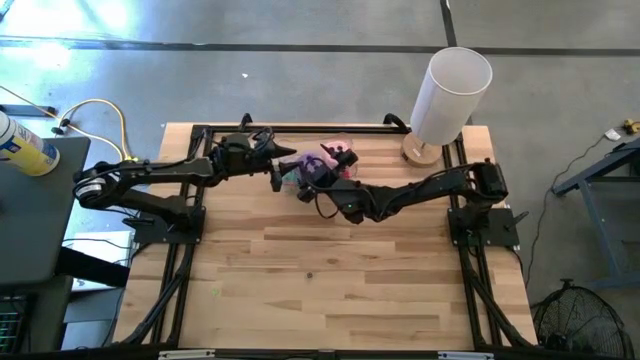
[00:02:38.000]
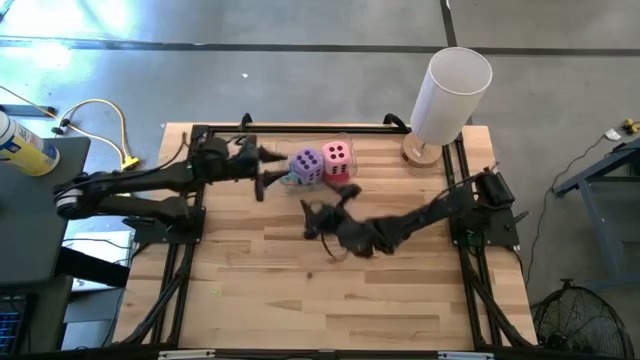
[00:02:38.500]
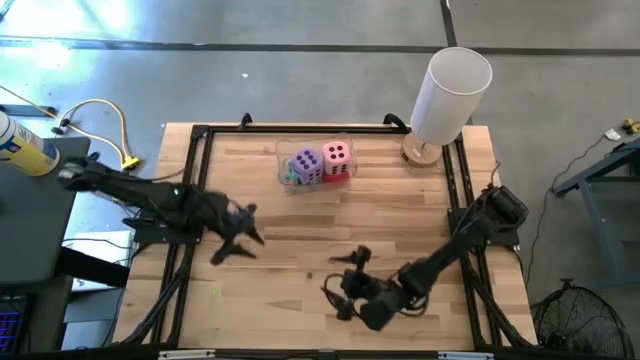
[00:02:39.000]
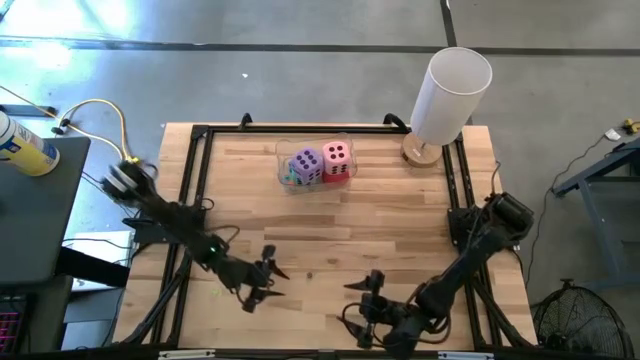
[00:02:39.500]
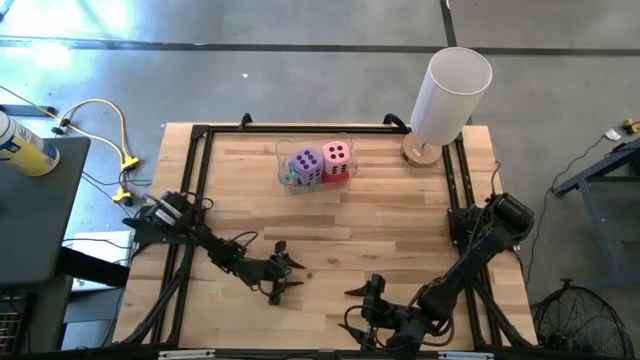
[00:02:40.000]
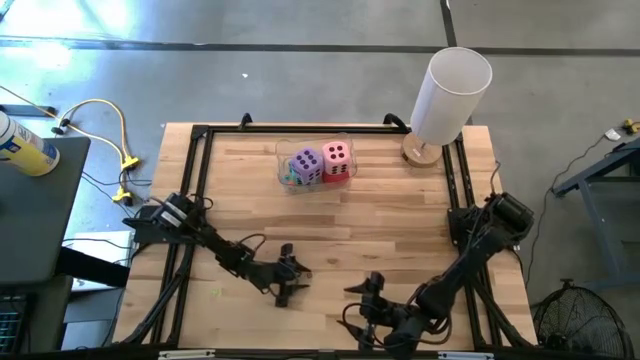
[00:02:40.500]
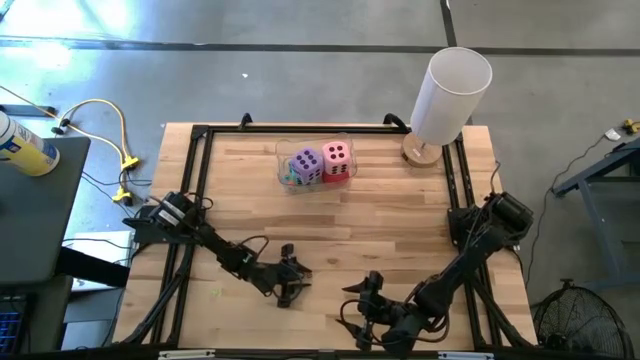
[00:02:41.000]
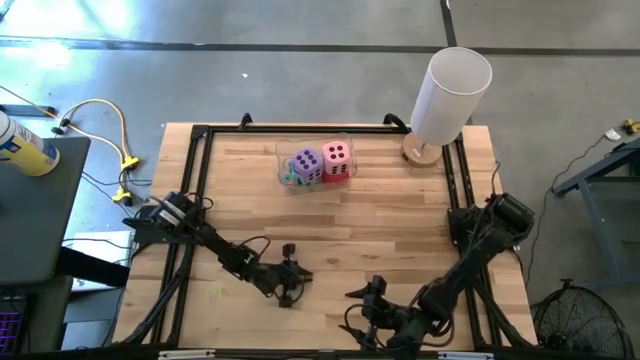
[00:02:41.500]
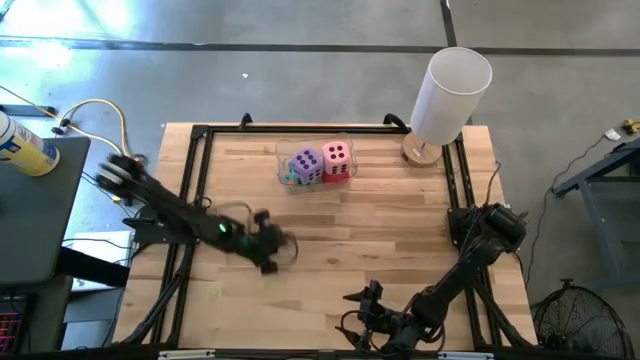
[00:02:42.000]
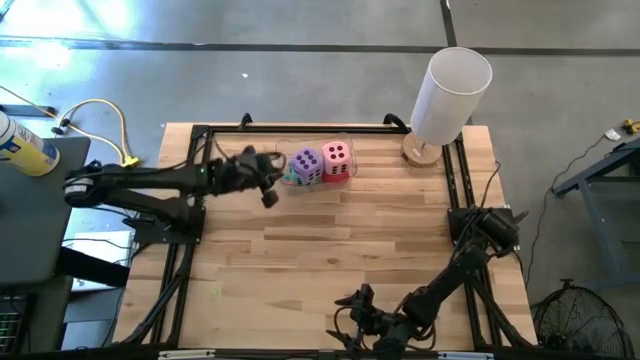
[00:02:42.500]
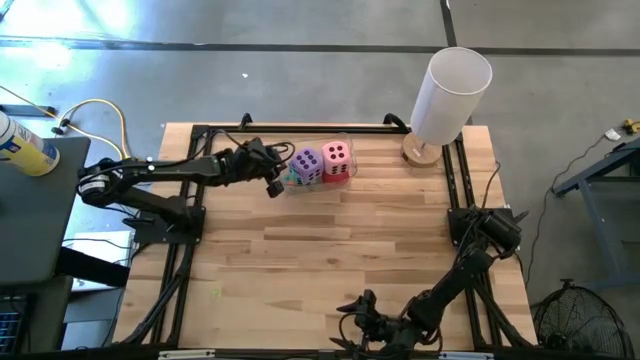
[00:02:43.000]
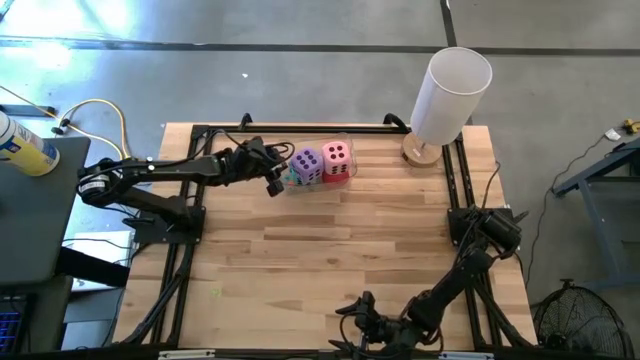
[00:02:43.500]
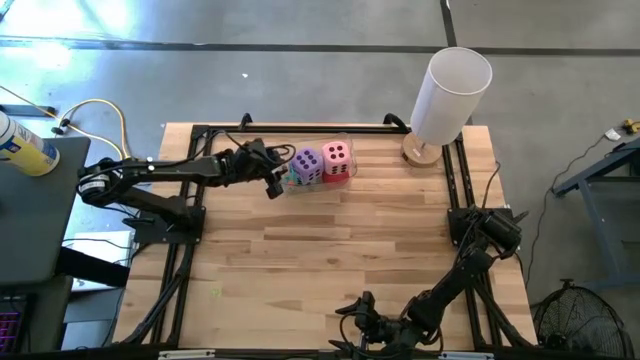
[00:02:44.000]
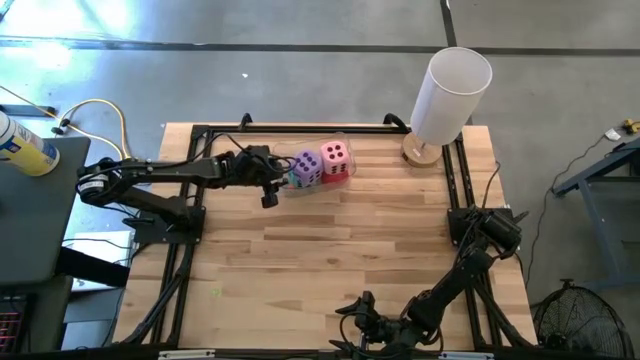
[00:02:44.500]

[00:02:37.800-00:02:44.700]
Task: Pick & Place Dice
Put the small black dice into the transparent bin

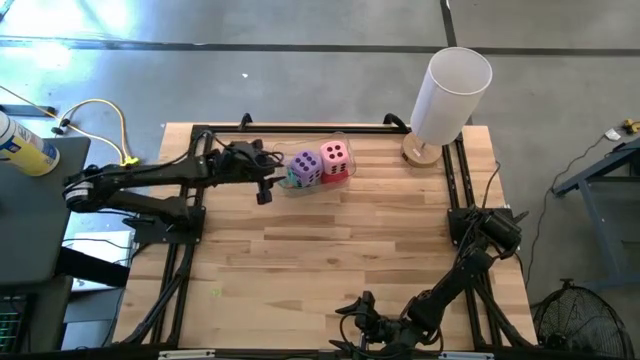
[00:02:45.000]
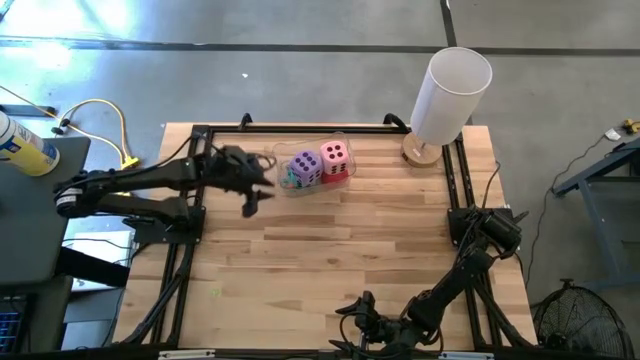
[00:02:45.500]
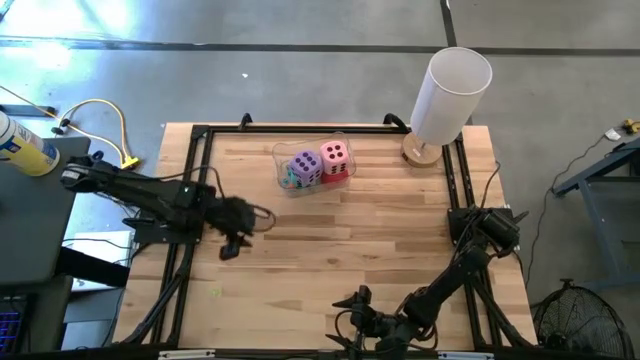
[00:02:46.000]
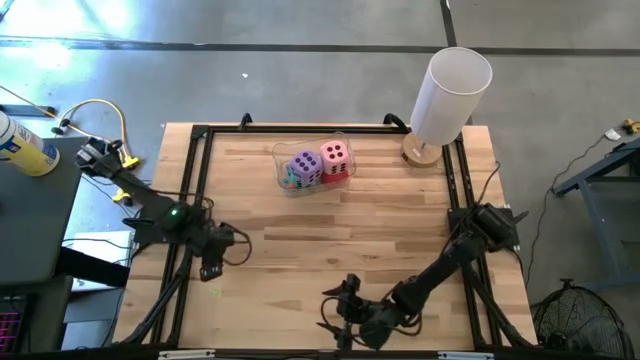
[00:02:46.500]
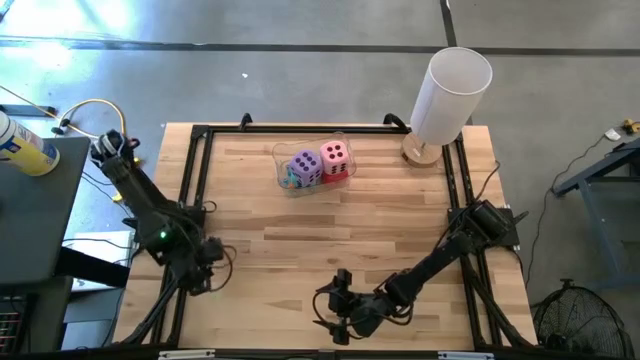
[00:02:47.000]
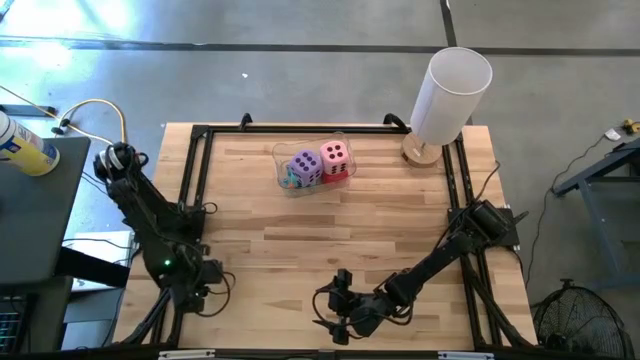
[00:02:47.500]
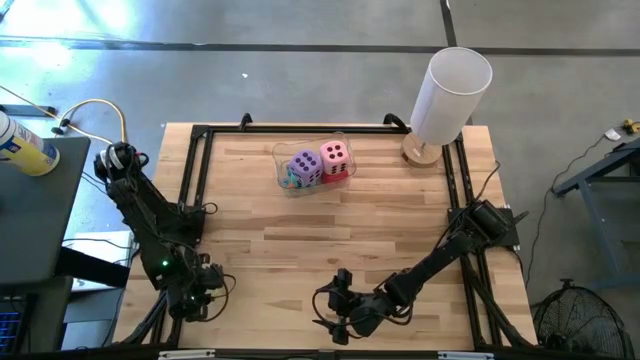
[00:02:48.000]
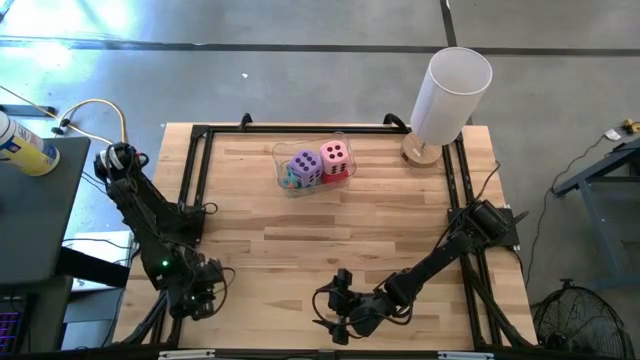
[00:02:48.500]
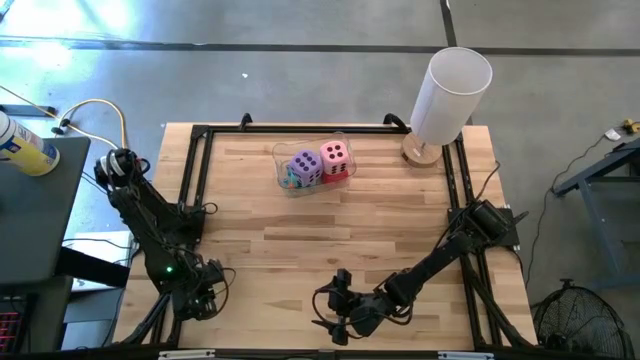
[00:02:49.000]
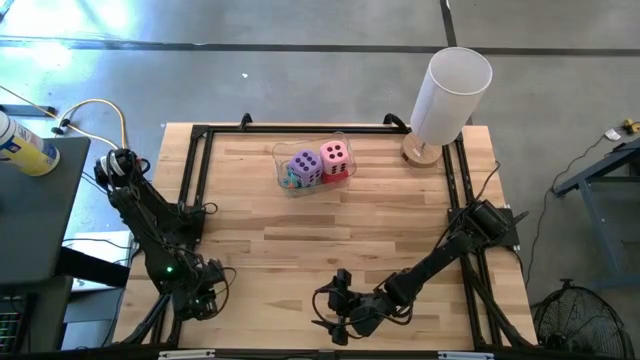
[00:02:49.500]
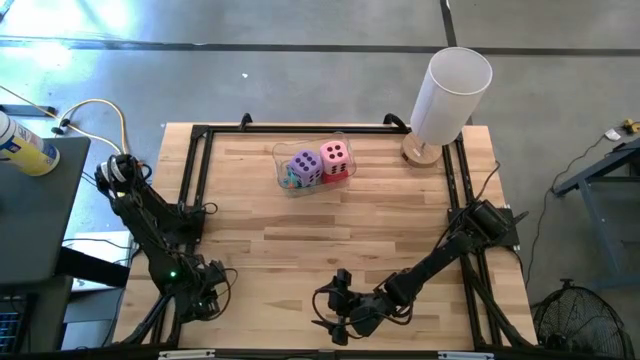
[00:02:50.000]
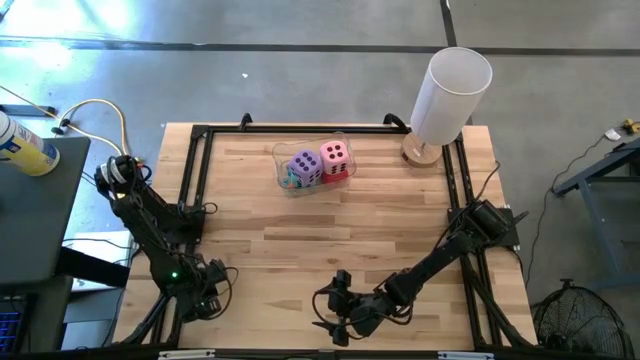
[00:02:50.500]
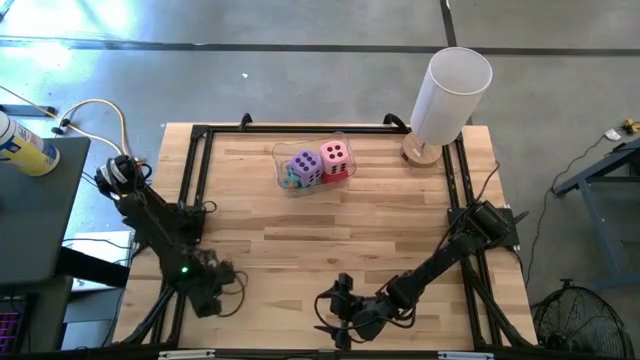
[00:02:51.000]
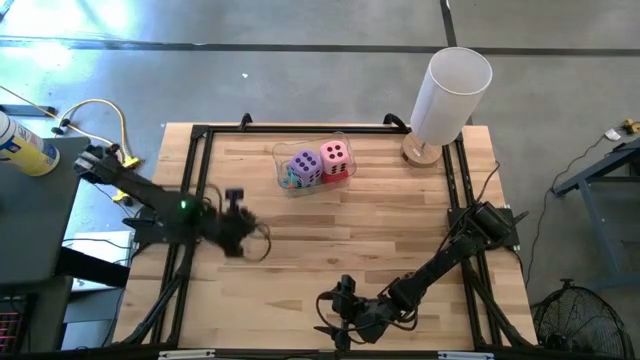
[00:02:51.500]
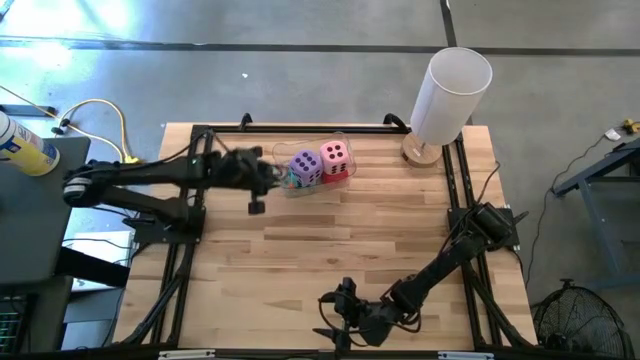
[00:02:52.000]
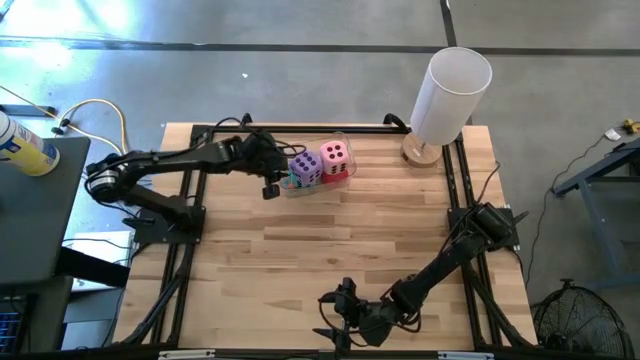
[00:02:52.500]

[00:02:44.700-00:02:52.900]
Put the small green dice into the transparent bin

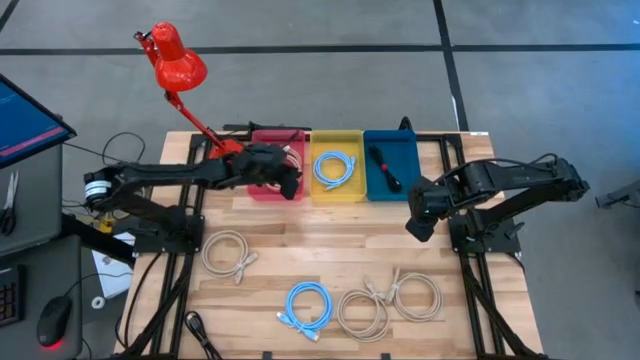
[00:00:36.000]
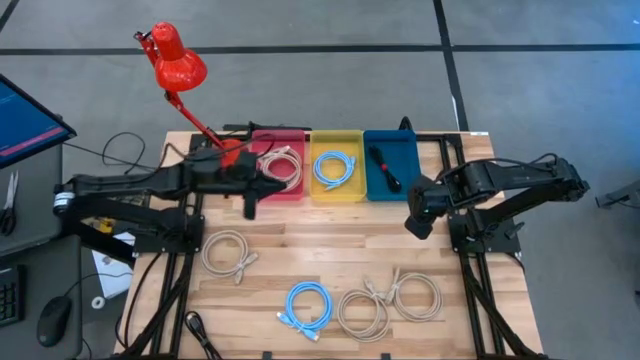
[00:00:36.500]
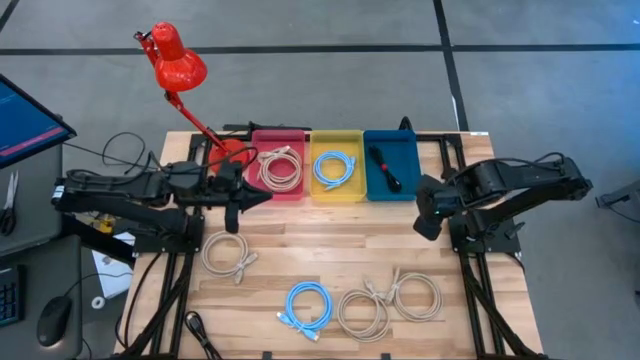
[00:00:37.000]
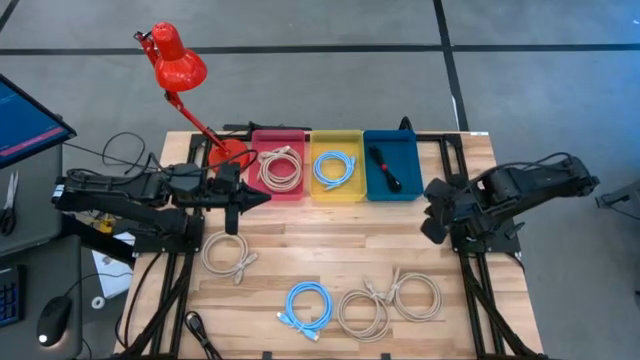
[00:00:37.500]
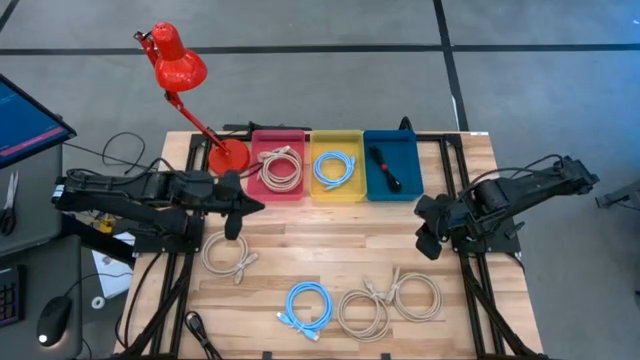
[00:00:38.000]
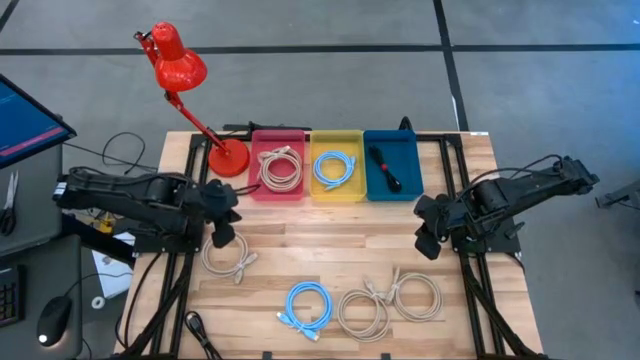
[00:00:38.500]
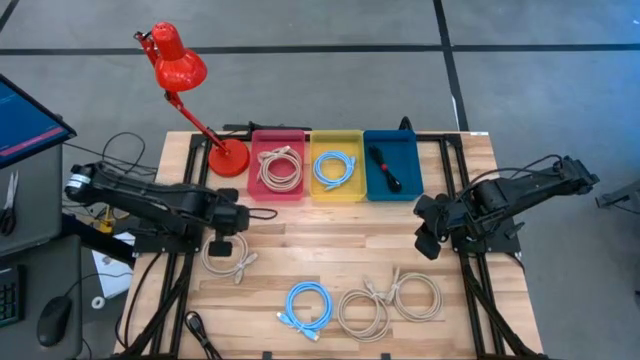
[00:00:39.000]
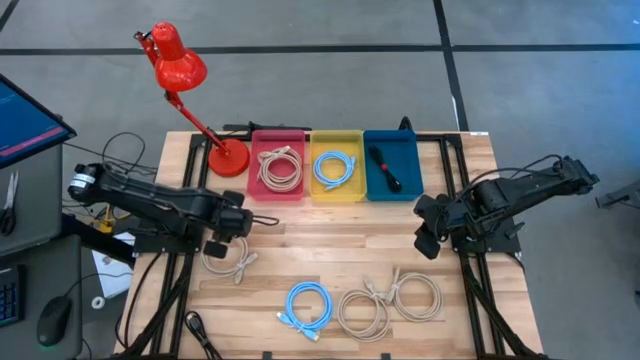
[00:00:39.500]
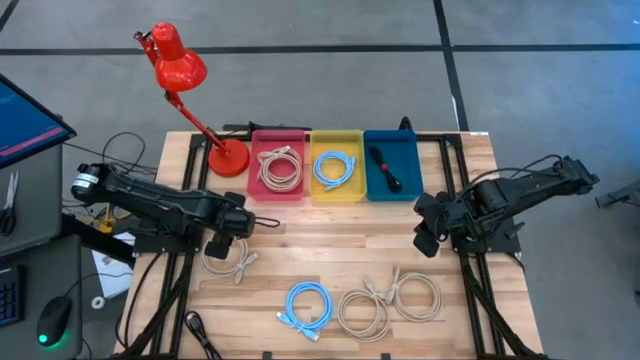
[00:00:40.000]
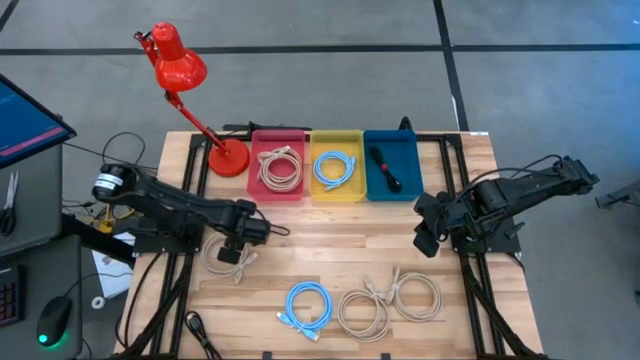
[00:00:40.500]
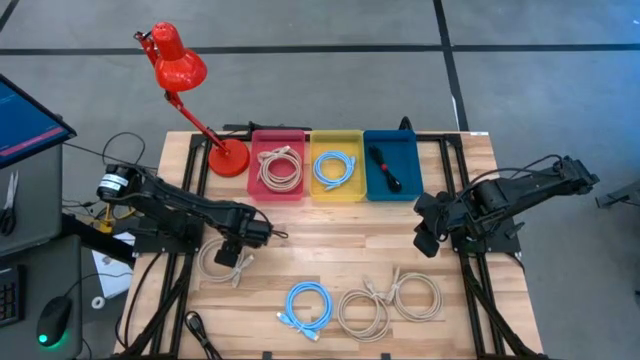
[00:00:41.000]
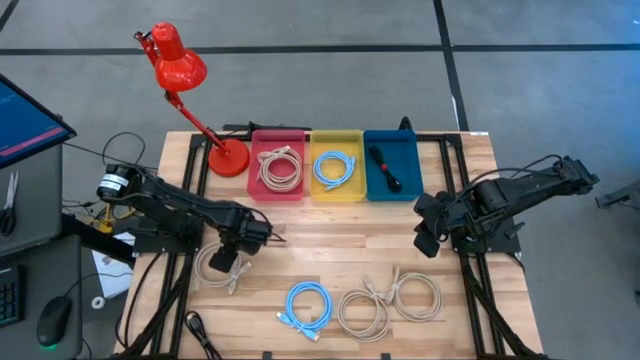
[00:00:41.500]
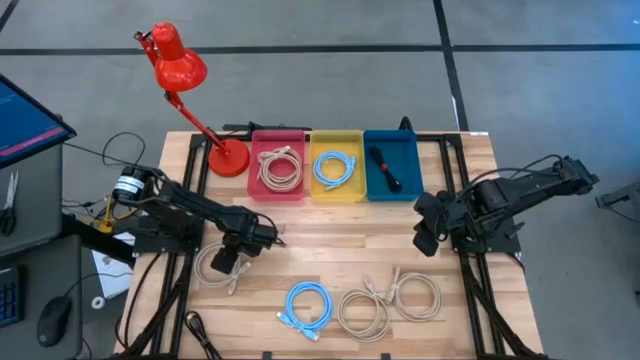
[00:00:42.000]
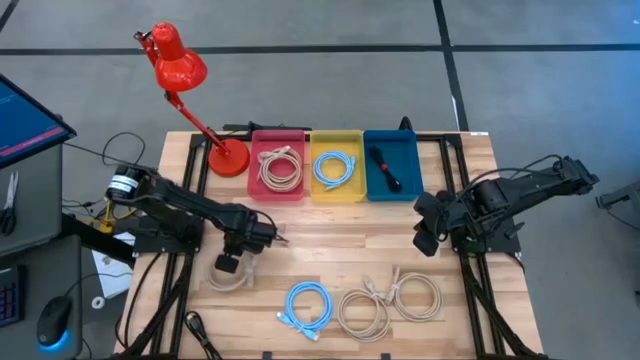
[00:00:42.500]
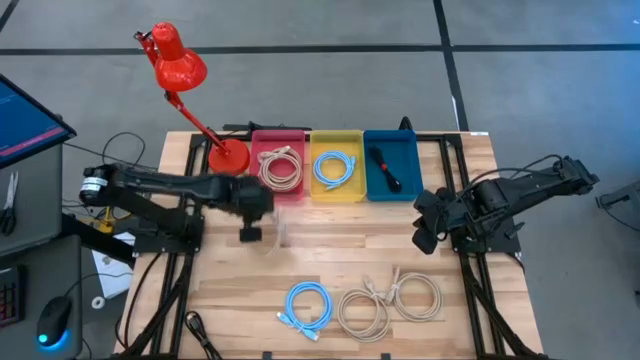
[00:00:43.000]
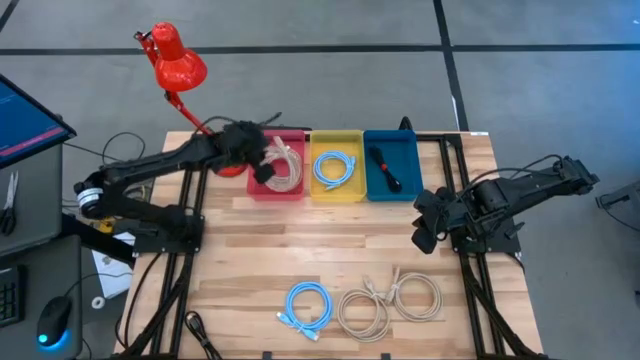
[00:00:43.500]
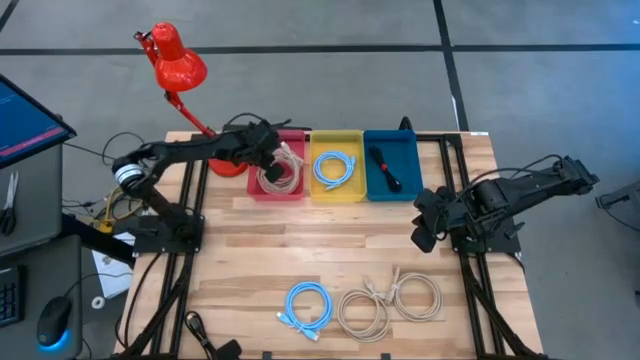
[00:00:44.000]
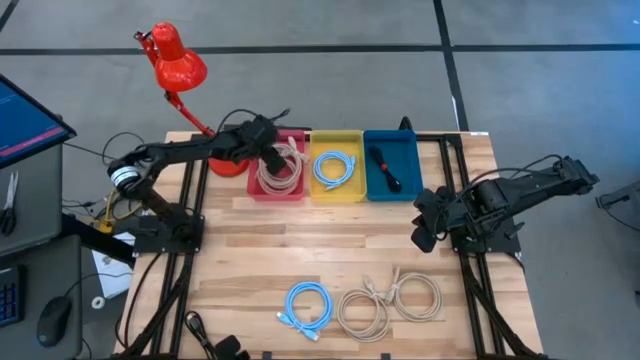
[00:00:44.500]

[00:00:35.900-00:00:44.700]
Task: Pick & Place USB Port
Put the left brown charger cable into the red bin
